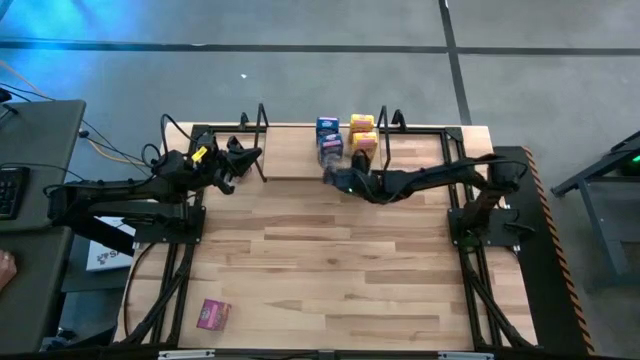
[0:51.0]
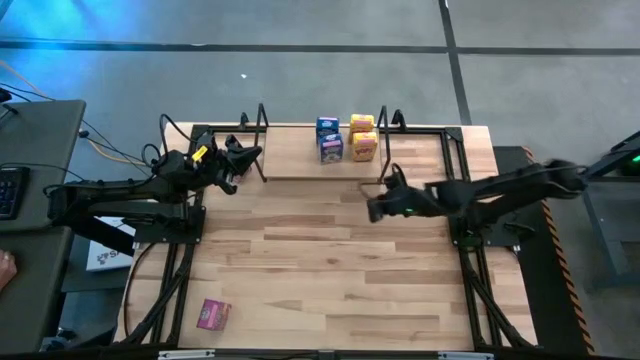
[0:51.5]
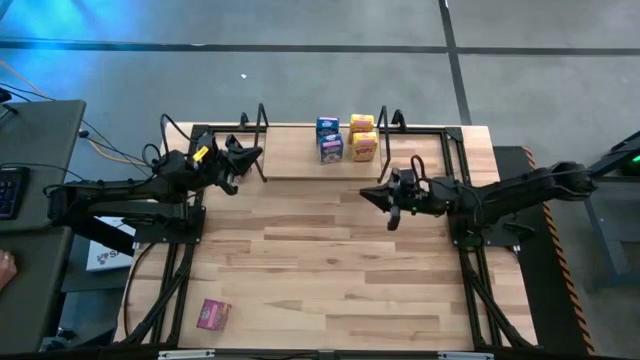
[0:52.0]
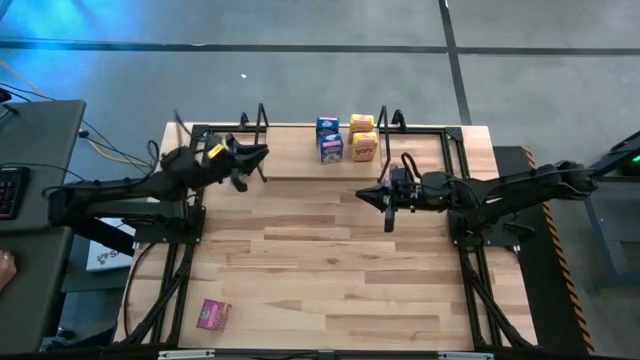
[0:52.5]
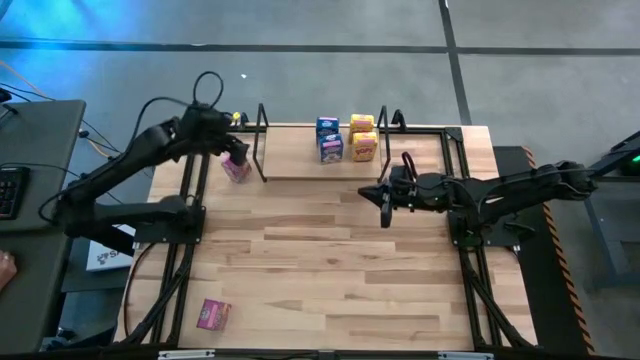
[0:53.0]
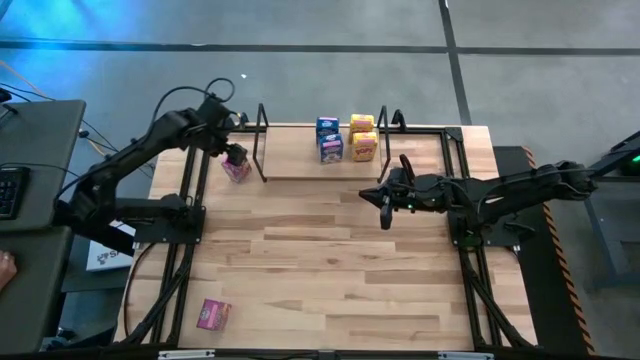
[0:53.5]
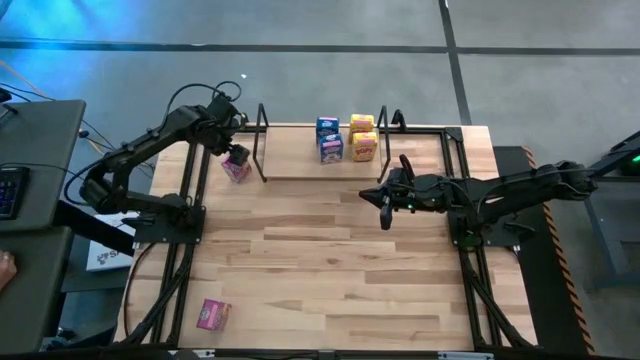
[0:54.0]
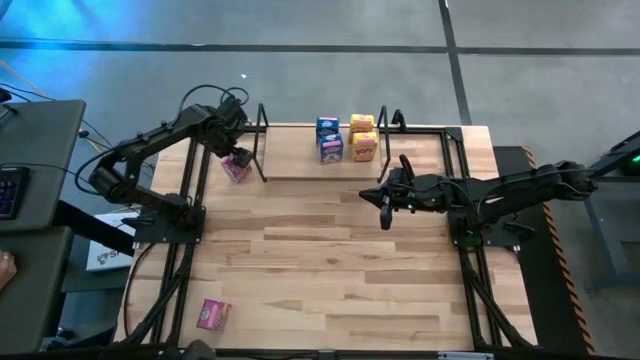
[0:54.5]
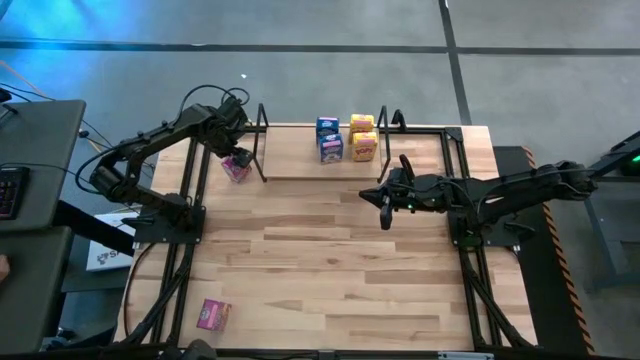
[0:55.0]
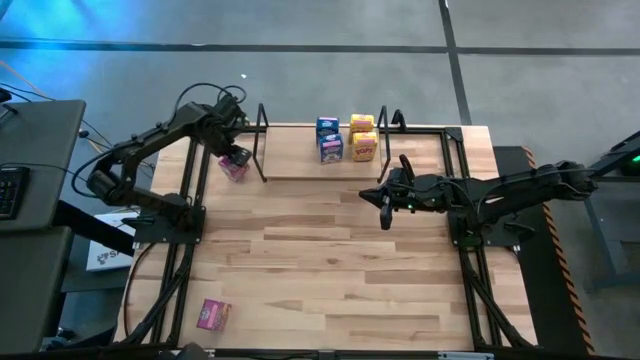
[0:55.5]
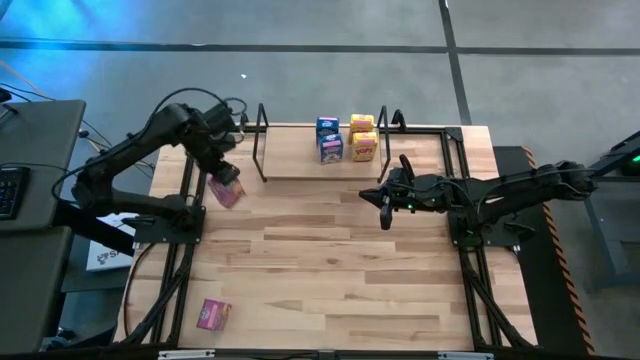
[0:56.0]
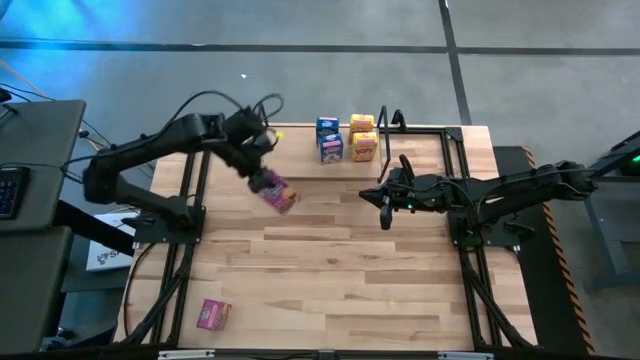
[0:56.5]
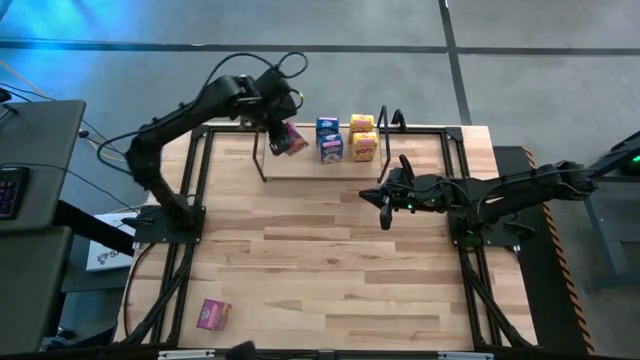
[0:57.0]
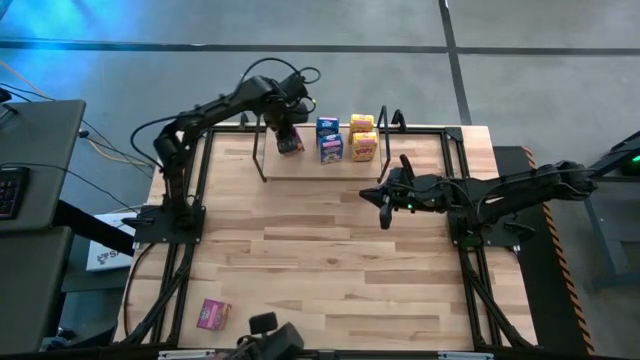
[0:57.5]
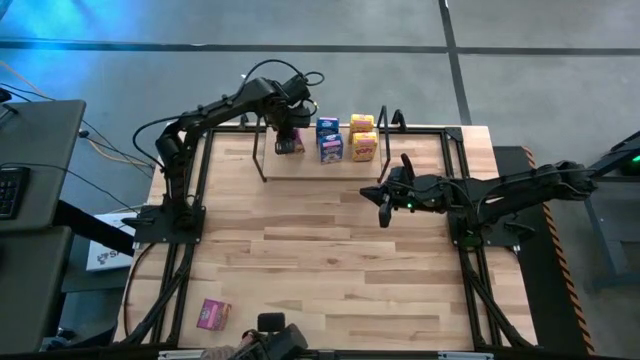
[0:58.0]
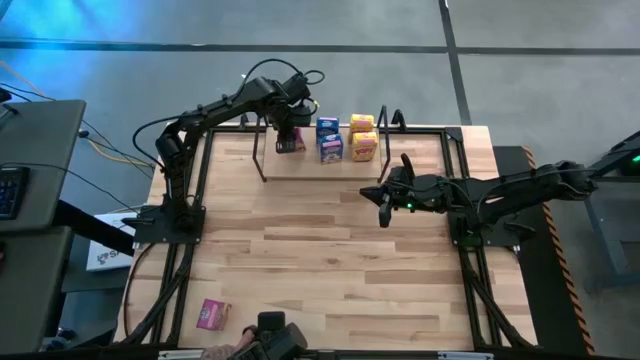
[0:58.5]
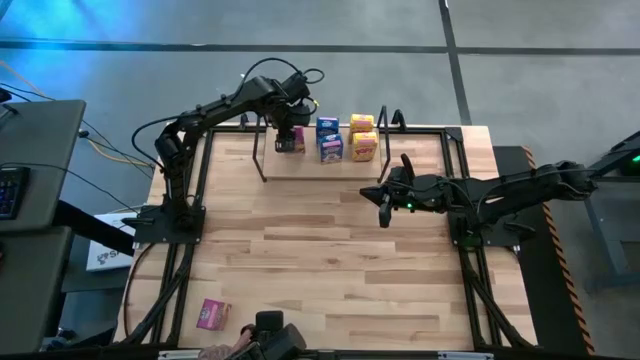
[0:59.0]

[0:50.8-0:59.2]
Task: Stack cereal on shelf
Put the top purple cereal box on the shelf

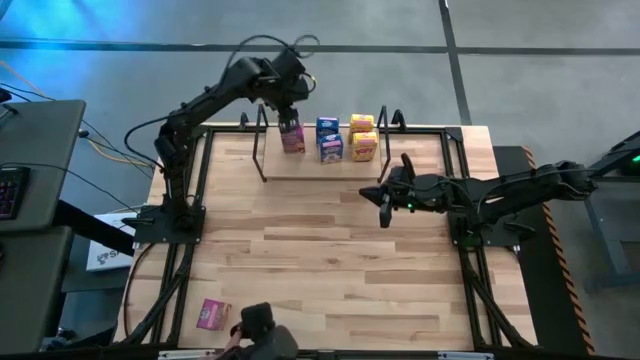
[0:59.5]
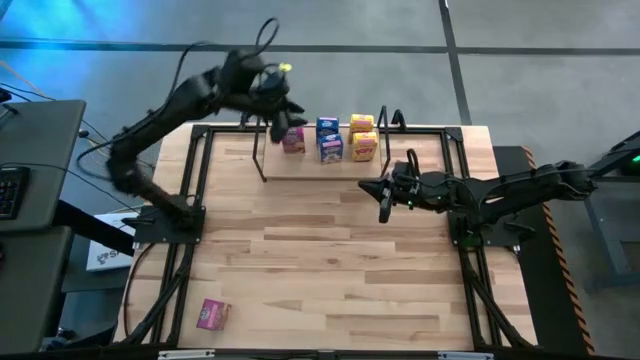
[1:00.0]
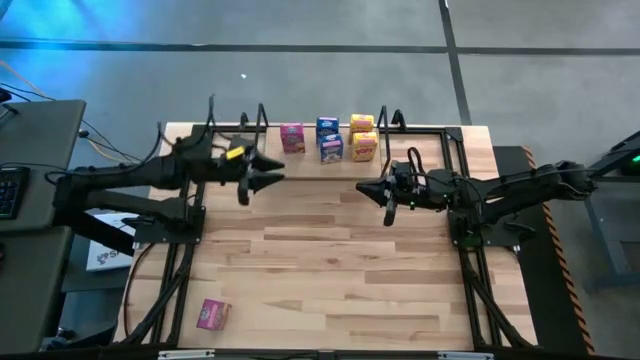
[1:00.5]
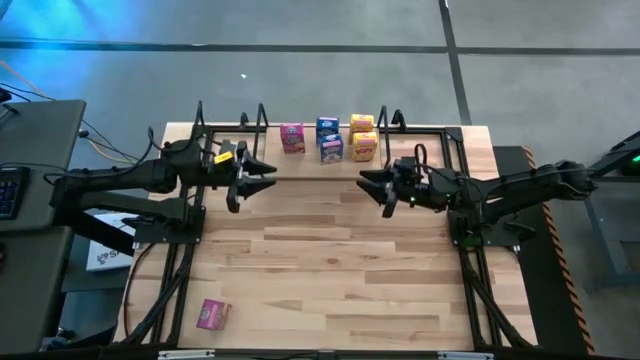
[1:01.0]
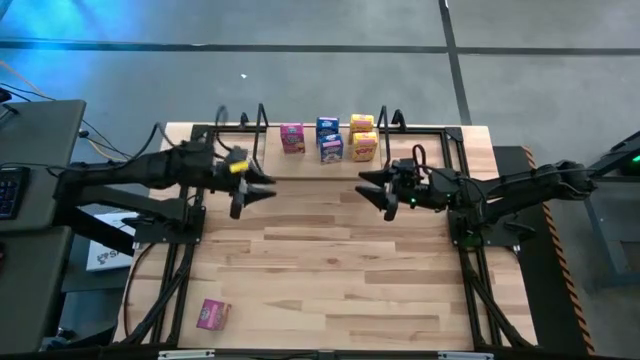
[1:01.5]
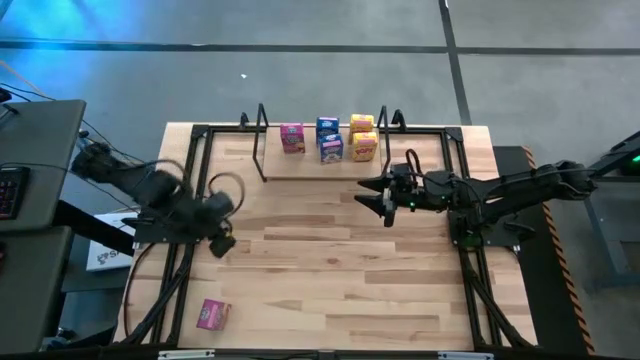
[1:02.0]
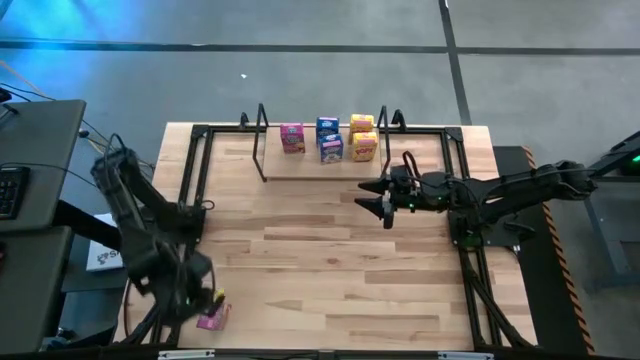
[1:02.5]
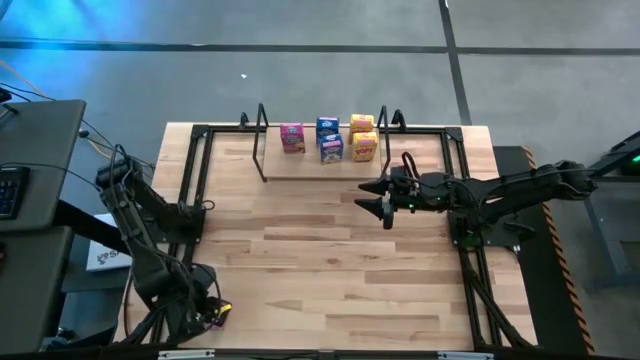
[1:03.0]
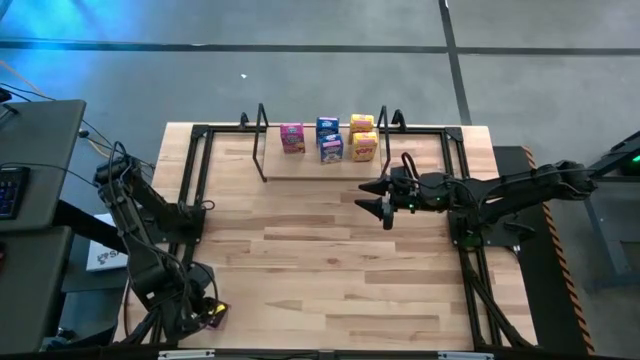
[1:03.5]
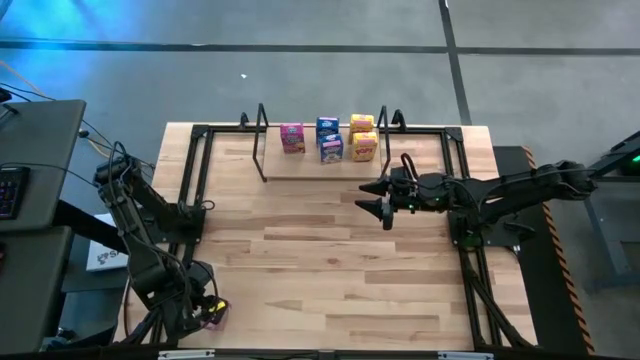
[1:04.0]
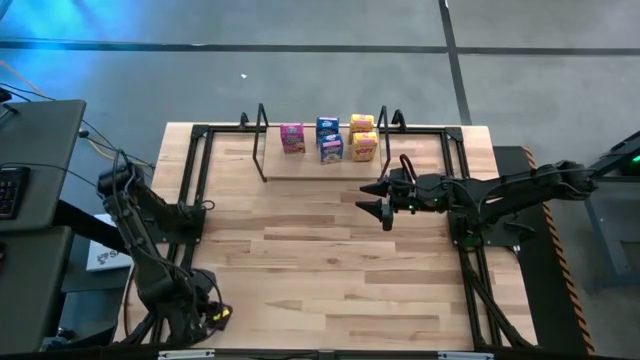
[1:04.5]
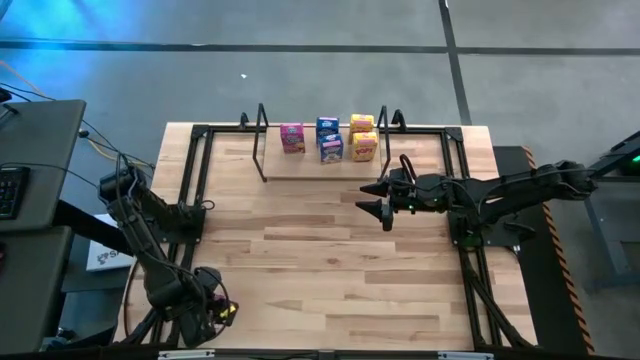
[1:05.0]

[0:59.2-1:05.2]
Put the purple cereal box on the shelf

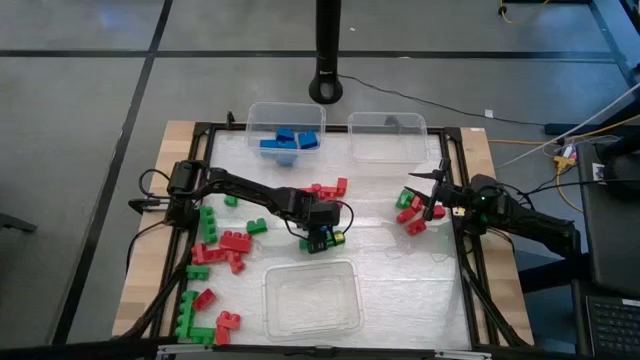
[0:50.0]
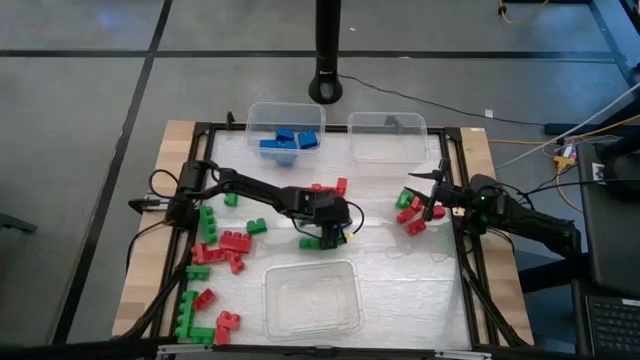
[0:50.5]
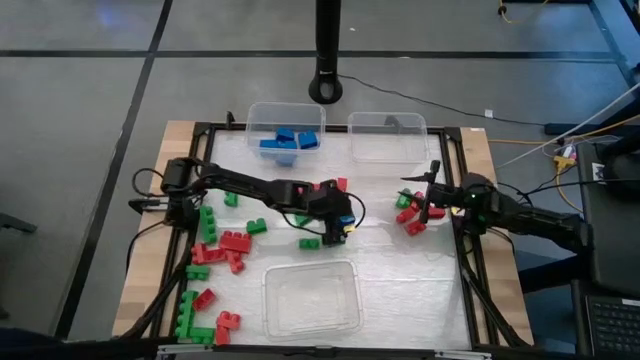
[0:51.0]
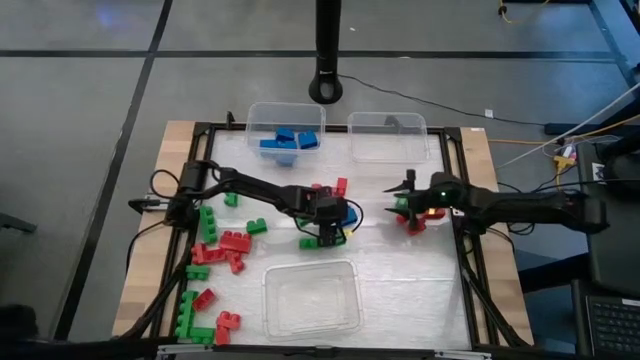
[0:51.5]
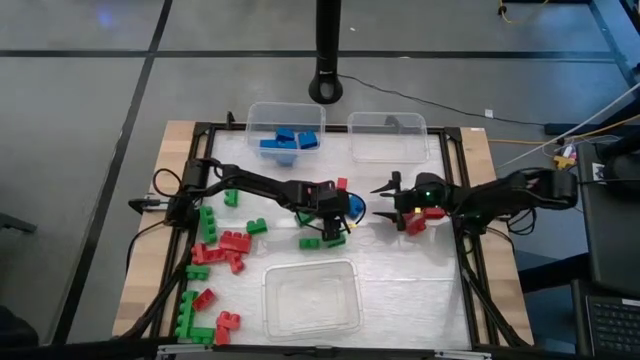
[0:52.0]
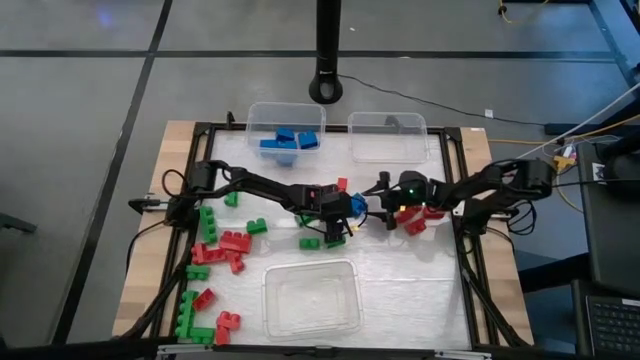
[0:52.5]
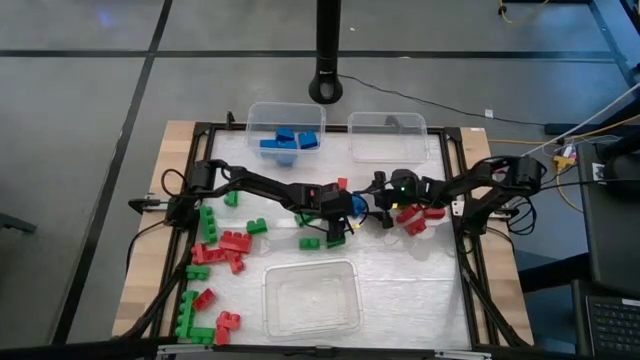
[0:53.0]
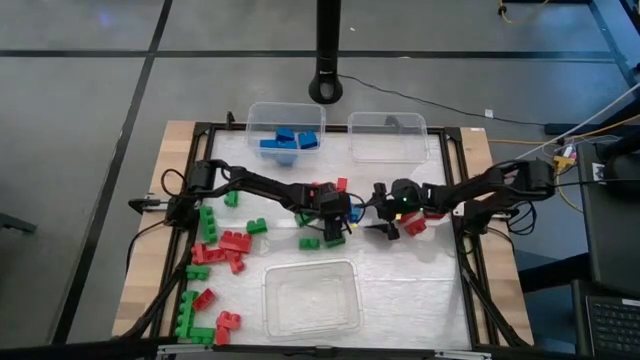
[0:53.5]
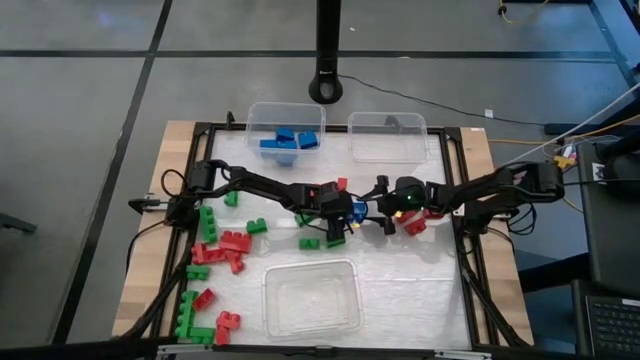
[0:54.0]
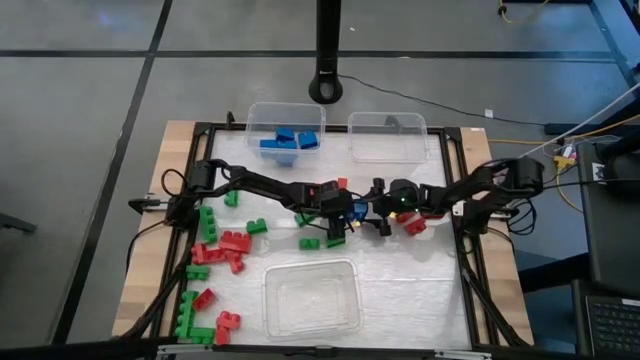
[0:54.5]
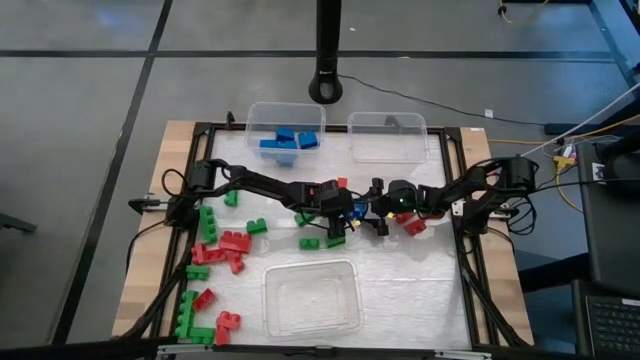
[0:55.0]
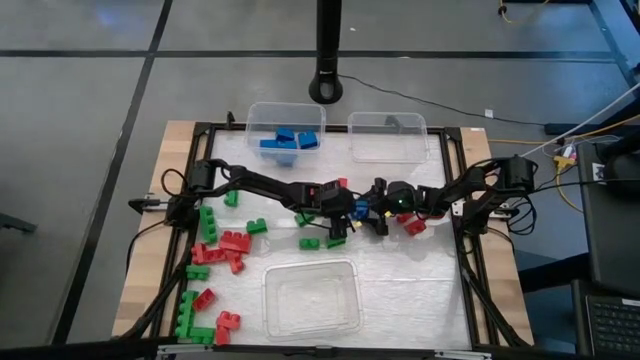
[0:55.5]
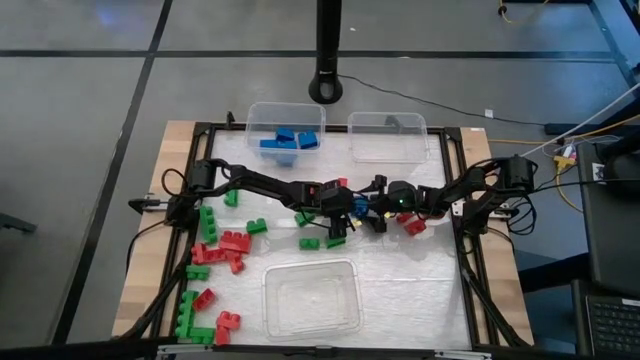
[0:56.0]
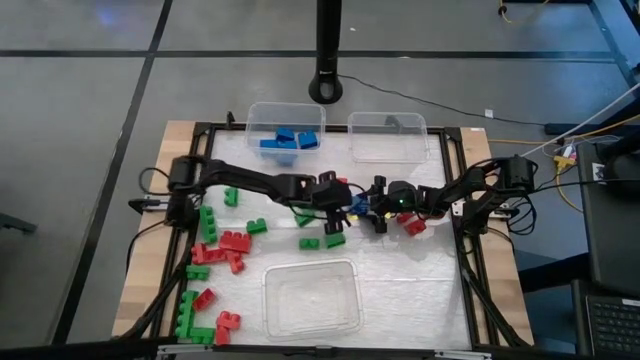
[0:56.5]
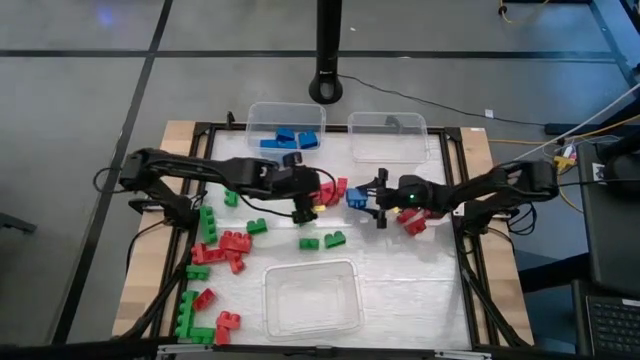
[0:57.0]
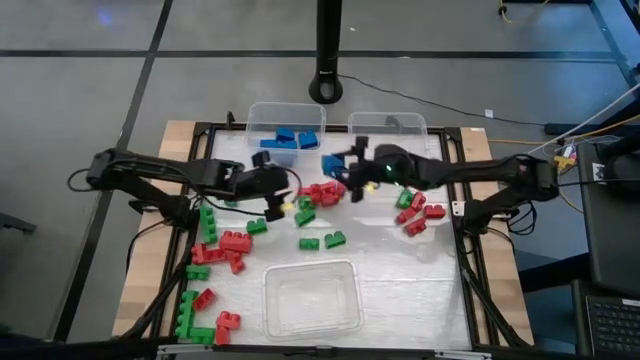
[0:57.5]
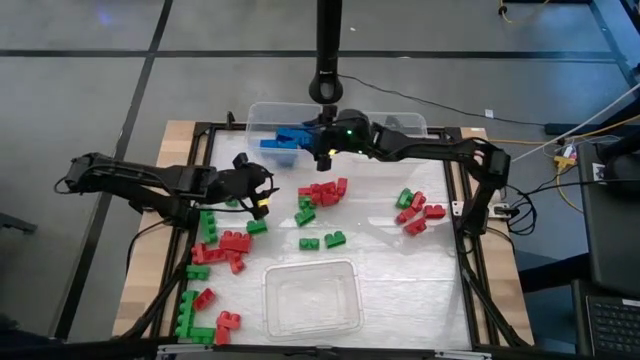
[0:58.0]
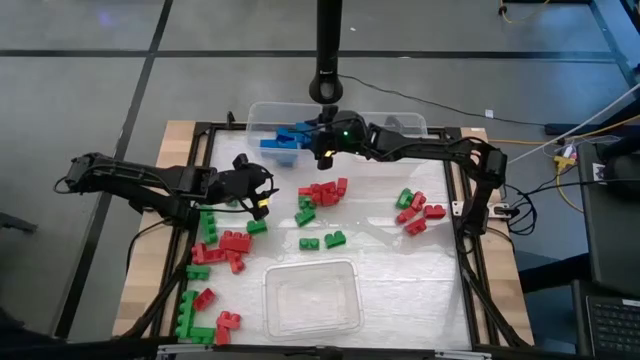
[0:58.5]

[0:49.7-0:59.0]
Task: Sort blocks
Put the blue game piece into the top left transparent bin
